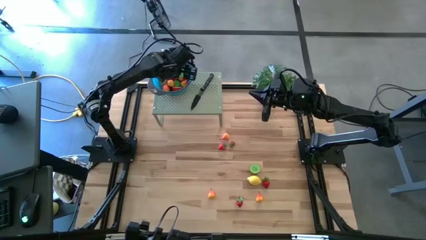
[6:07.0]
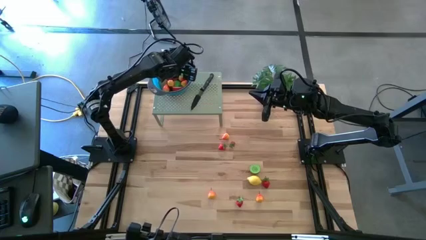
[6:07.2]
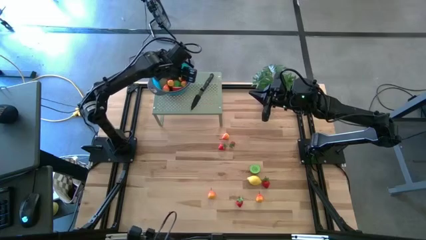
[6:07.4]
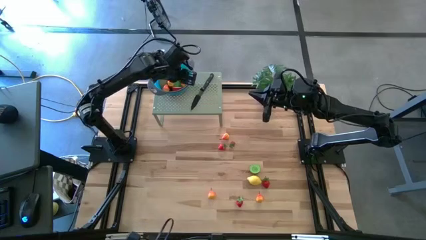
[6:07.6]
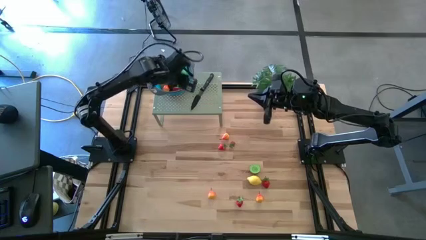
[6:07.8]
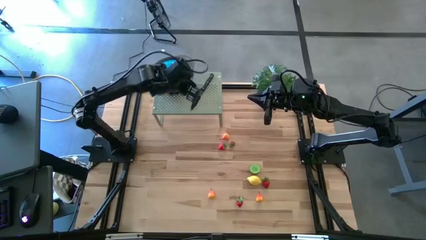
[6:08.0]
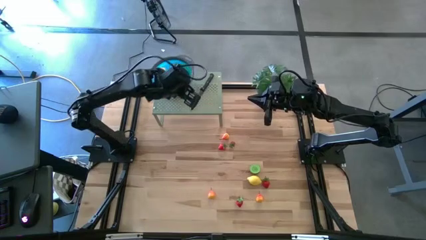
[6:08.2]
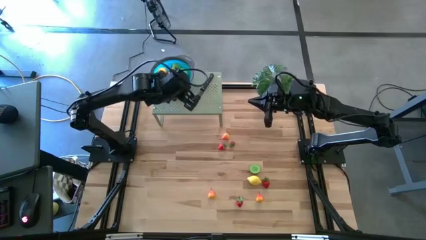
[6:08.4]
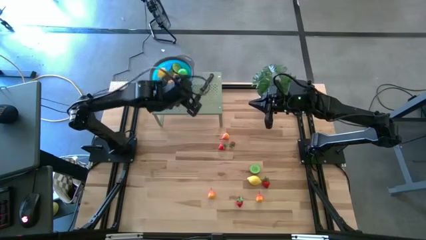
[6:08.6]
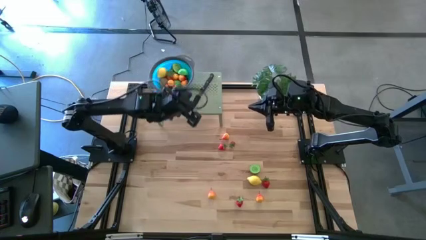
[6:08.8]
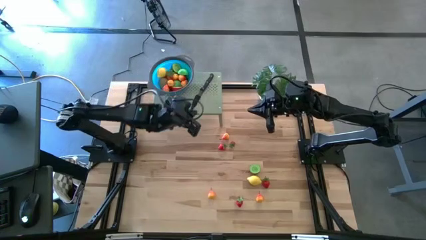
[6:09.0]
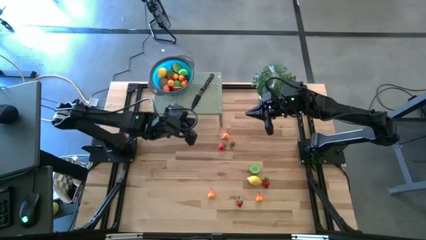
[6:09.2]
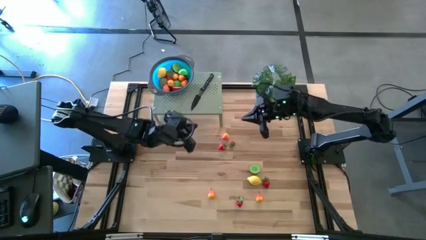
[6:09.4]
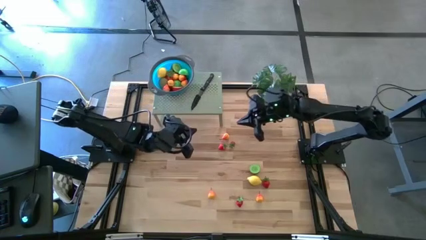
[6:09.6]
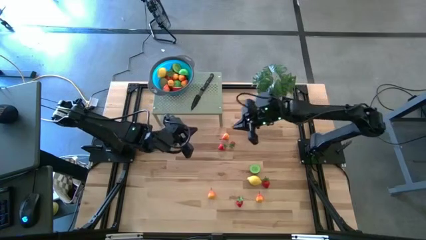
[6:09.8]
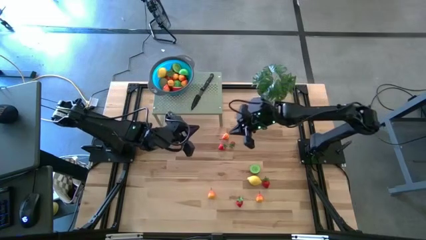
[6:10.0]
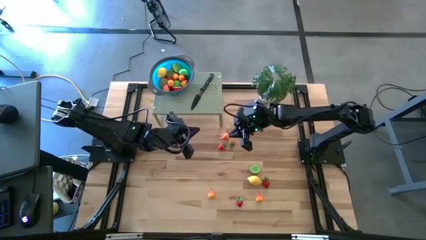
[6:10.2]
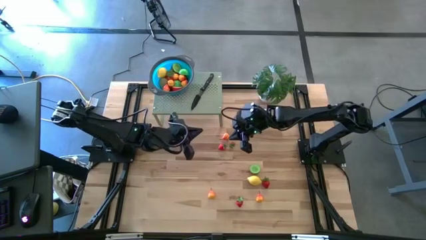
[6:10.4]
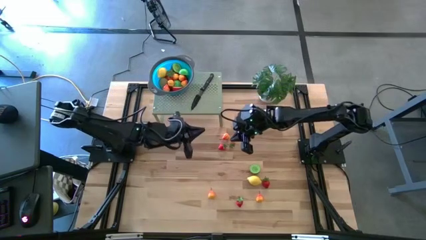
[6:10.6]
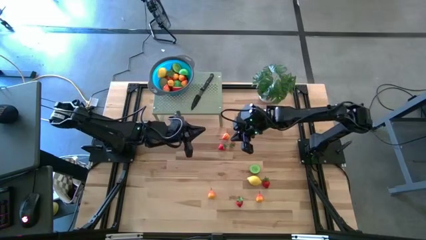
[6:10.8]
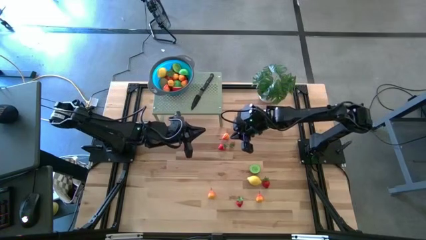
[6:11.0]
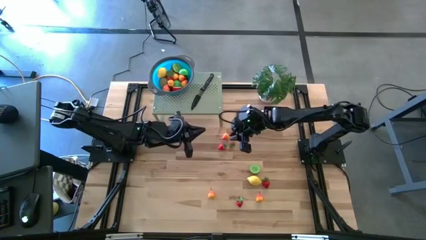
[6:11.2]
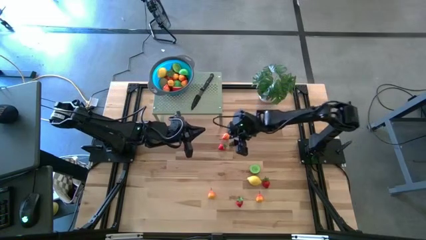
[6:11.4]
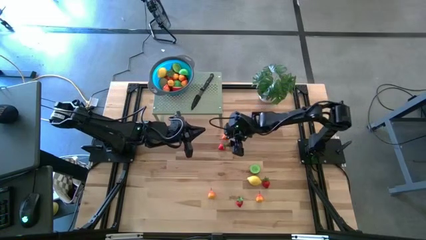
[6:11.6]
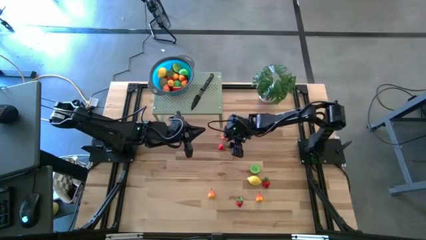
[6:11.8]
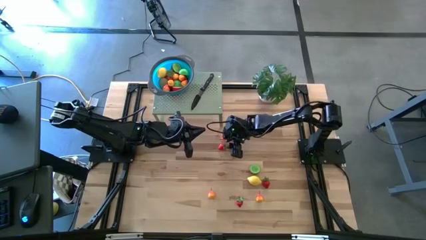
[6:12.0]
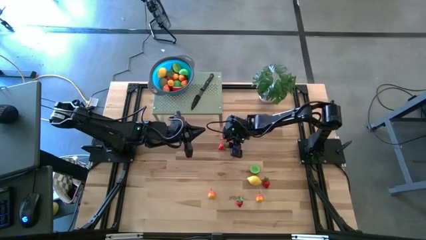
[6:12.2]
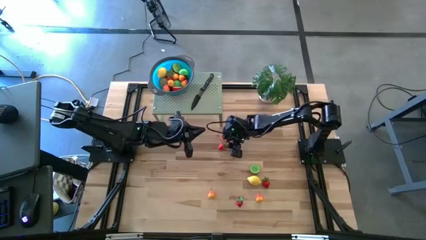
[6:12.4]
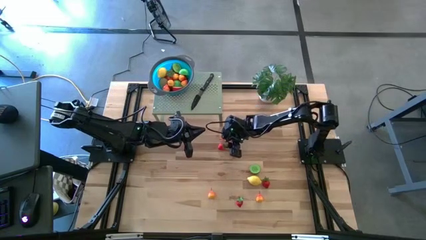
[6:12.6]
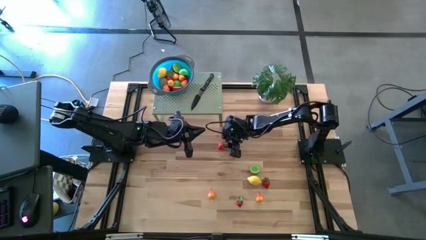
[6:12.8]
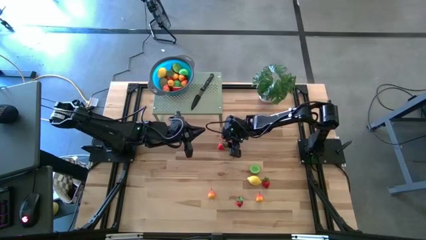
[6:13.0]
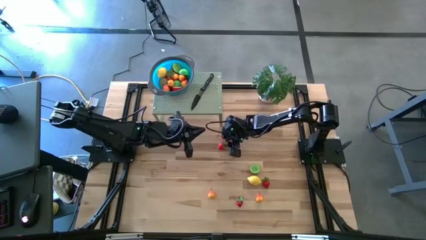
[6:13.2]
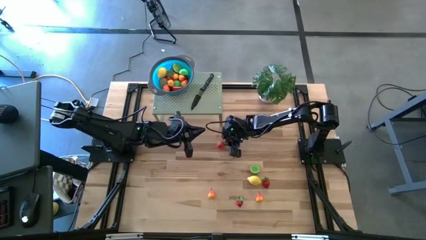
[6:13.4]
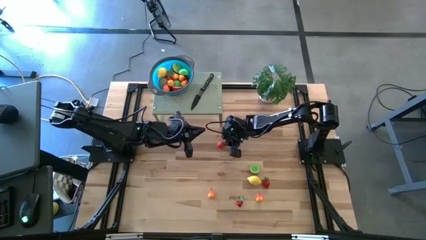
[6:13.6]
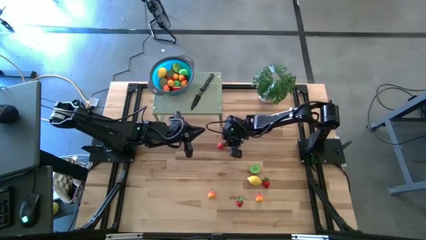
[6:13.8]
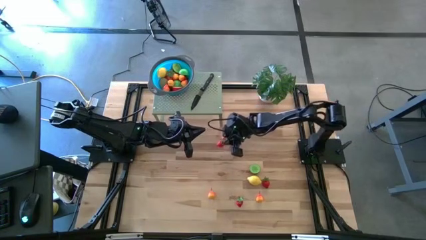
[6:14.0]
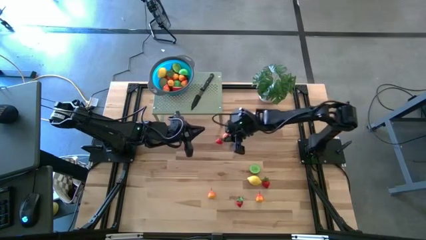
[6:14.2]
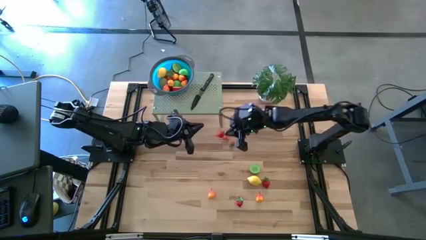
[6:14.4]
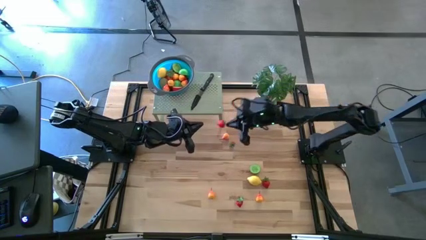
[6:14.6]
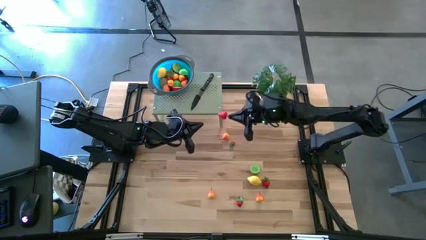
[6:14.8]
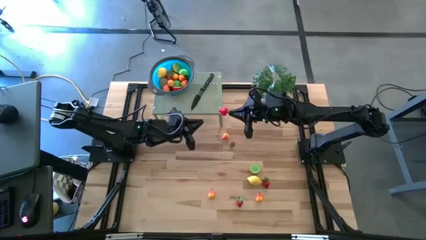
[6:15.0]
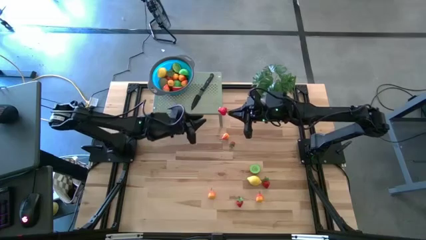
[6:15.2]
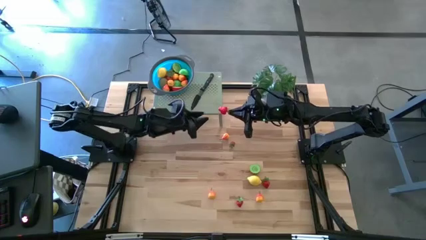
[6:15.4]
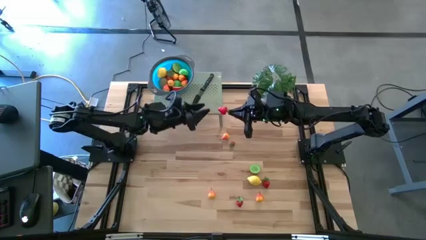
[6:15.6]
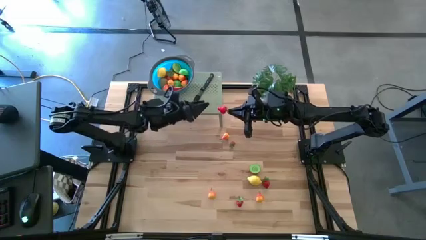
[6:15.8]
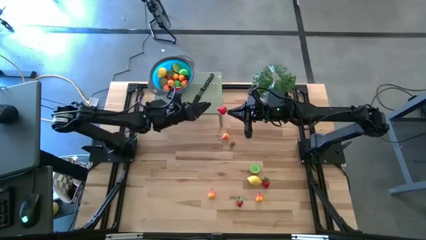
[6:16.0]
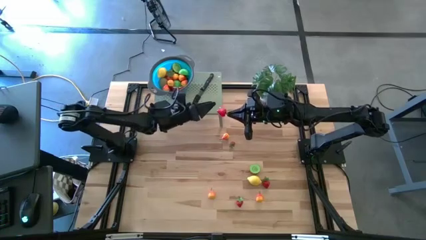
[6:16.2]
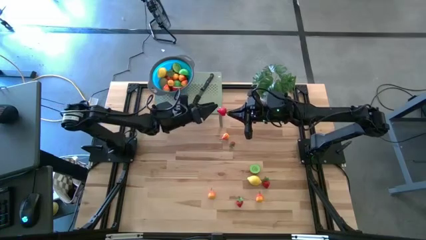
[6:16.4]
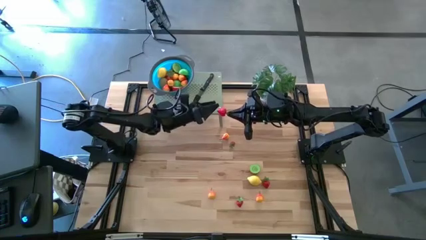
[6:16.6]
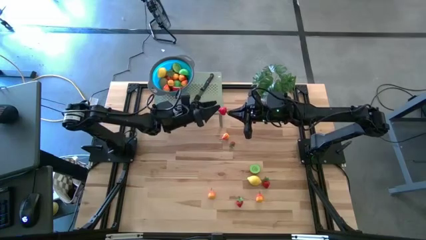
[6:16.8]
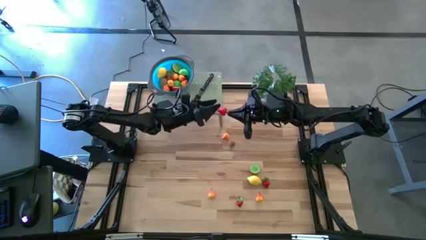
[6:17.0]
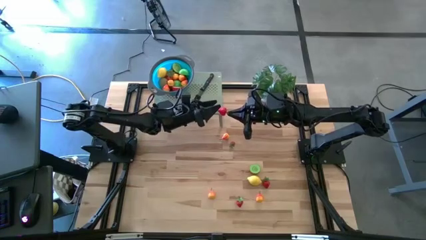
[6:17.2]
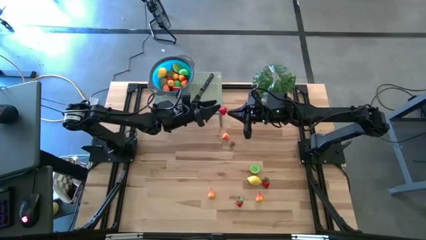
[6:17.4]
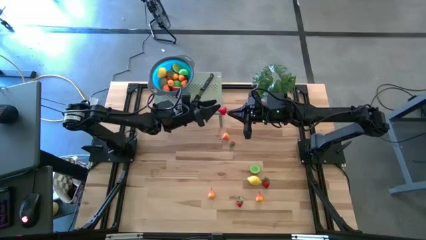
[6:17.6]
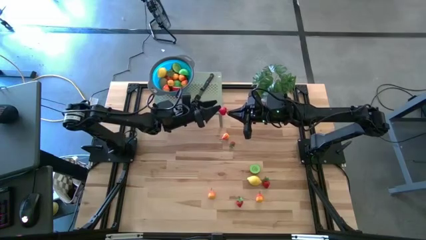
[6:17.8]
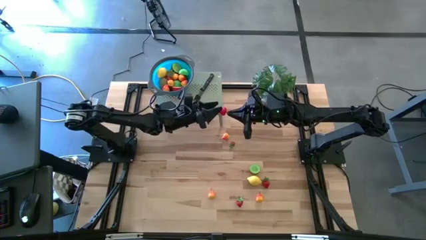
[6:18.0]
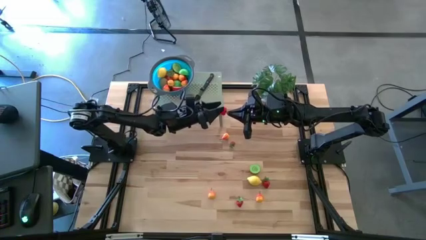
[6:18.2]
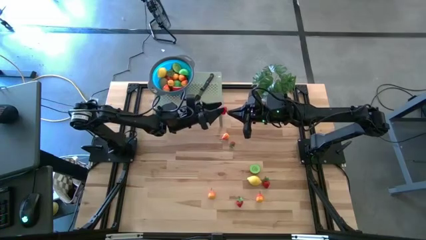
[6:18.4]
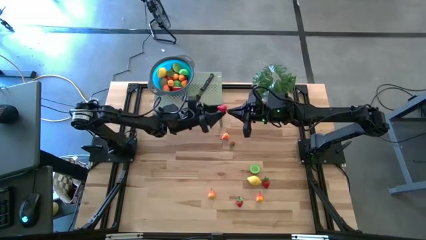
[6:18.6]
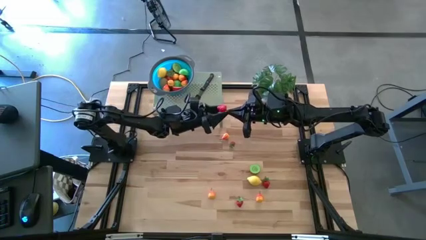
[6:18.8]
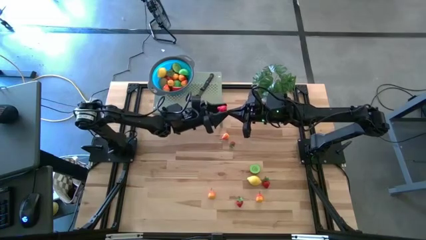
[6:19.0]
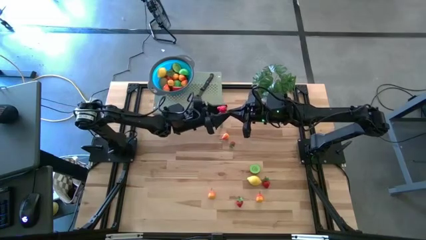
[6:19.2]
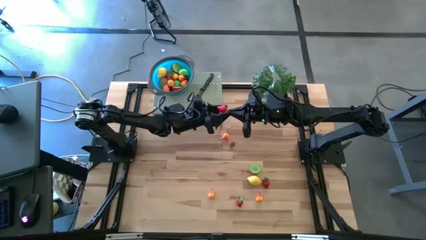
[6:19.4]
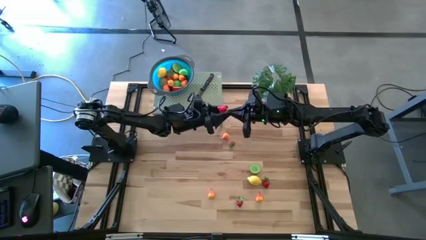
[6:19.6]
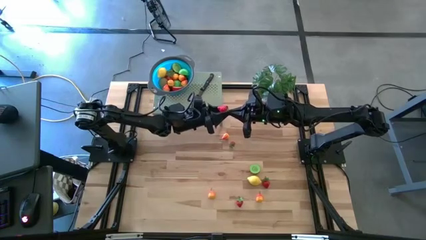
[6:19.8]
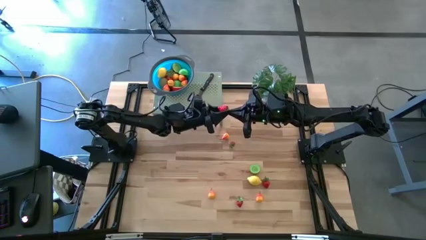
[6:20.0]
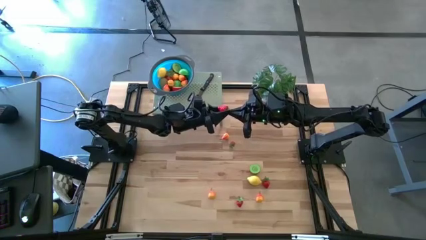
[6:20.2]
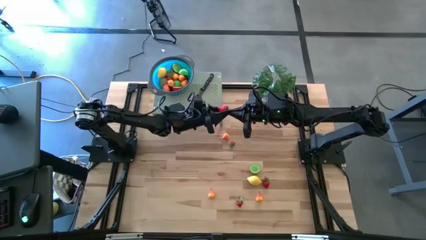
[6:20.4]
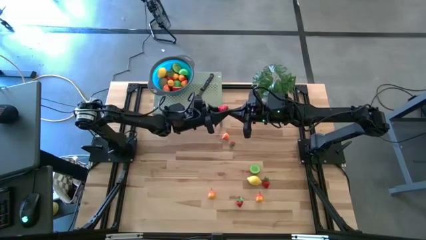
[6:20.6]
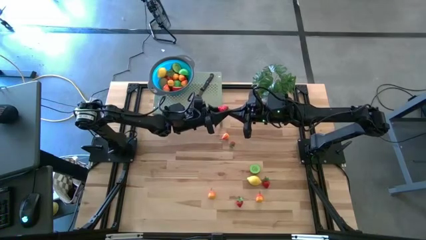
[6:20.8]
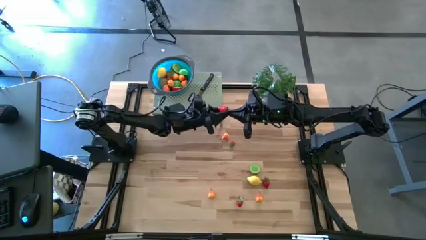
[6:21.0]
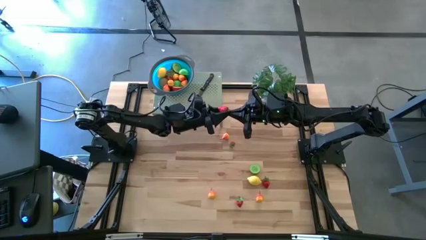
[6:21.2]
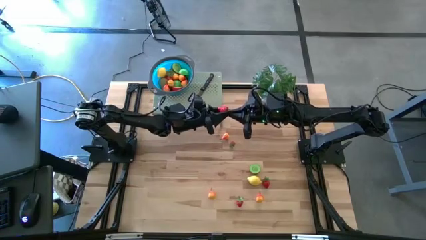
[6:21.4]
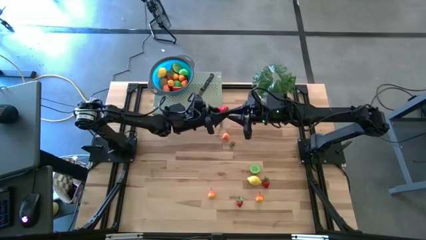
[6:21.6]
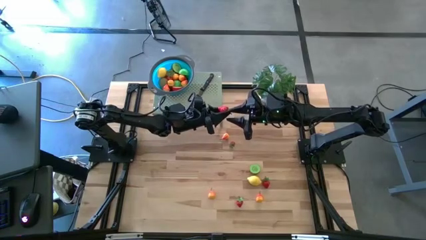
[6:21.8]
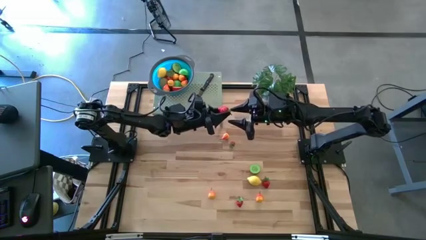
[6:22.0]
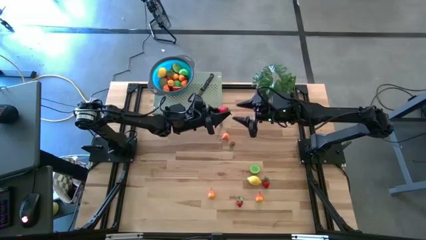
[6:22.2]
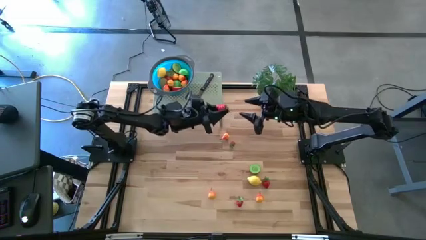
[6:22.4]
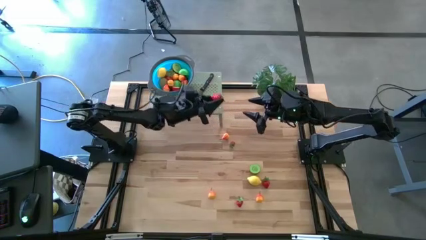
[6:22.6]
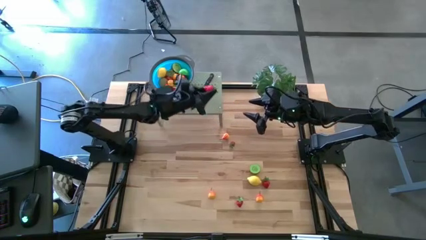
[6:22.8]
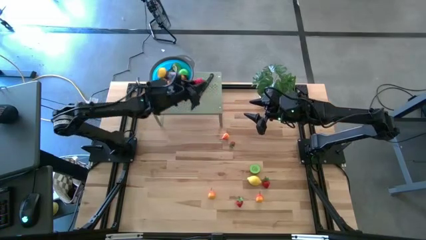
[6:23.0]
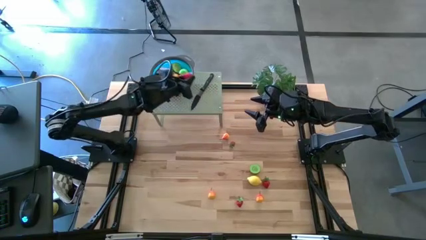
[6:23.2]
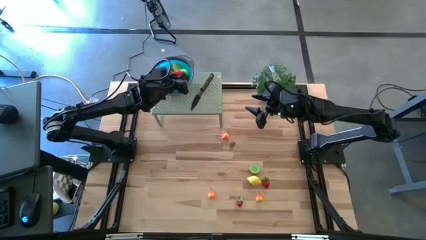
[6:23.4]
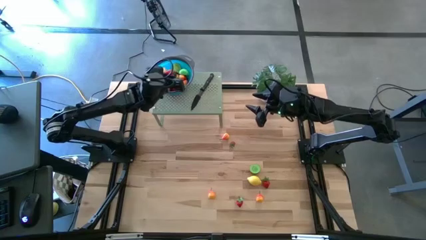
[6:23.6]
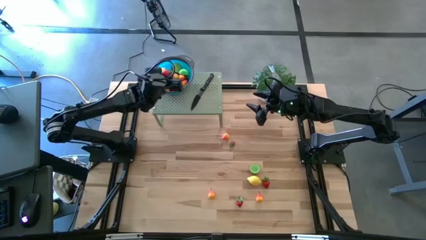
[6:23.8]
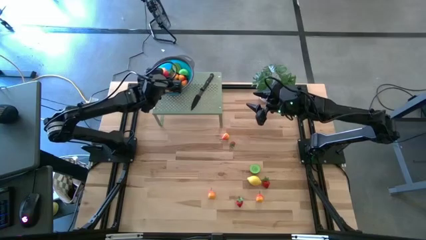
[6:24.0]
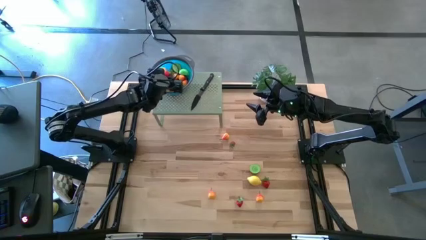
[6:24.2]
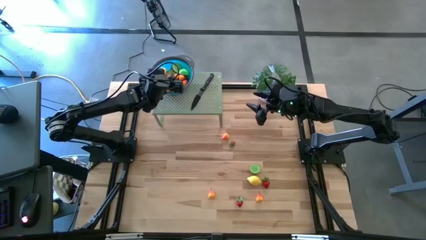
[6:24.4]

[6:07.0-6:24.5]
Task: Pick & Place Fruit
Put the strawberry into the strainer bowl on the shelf
